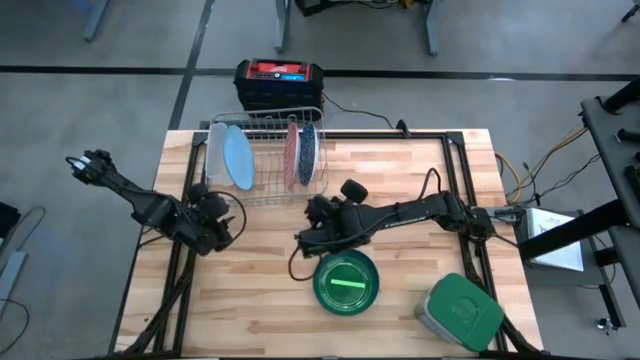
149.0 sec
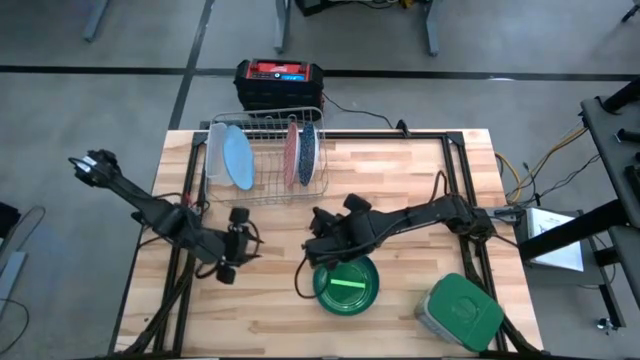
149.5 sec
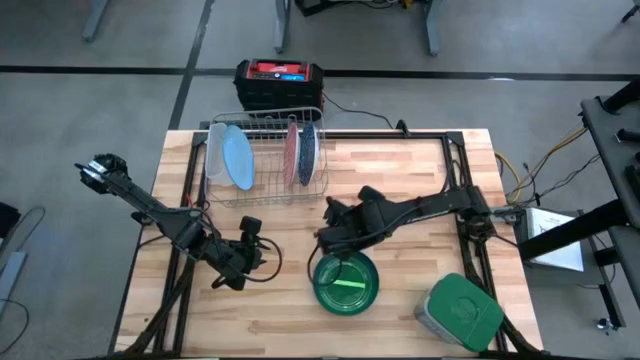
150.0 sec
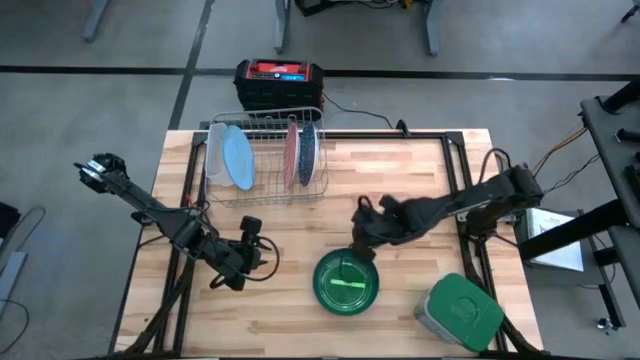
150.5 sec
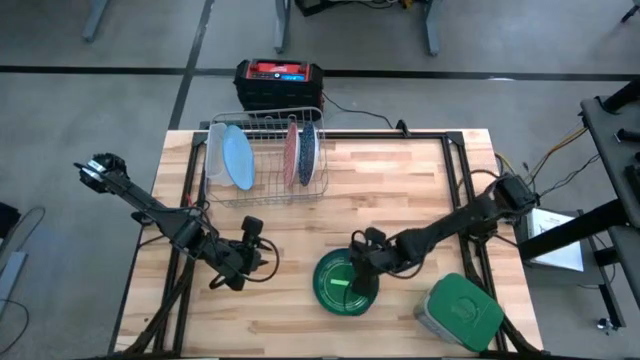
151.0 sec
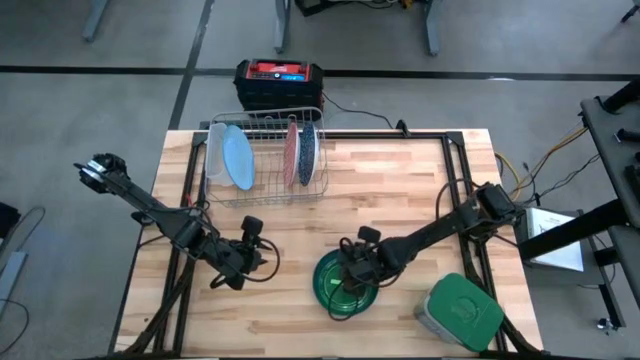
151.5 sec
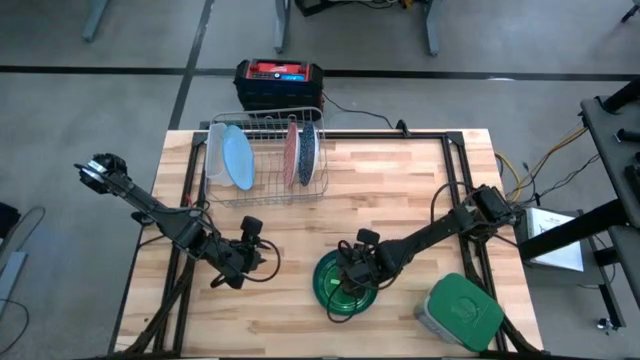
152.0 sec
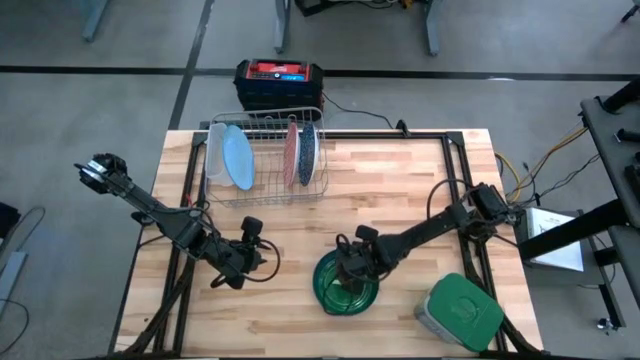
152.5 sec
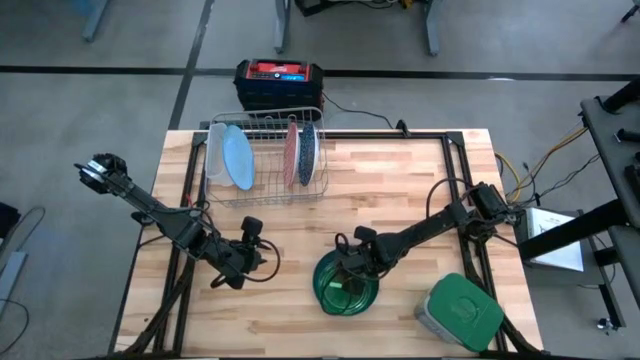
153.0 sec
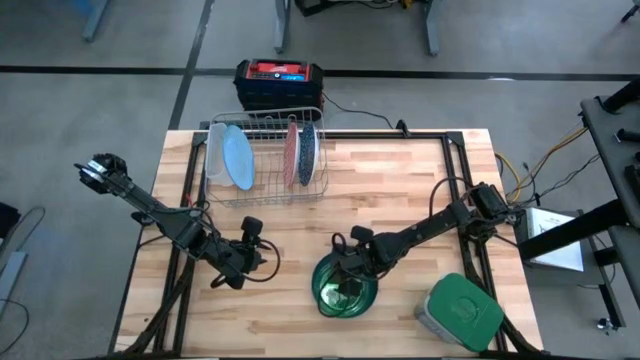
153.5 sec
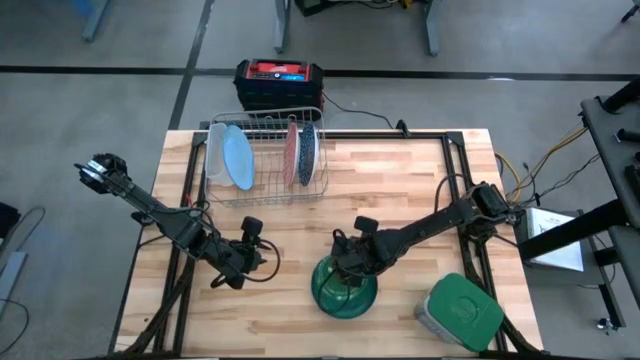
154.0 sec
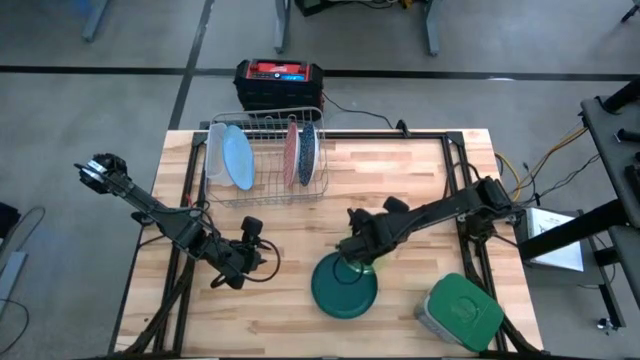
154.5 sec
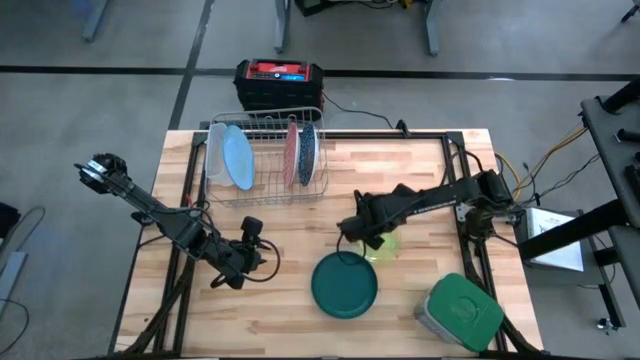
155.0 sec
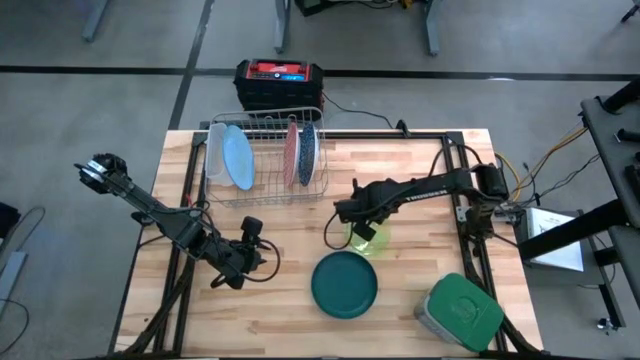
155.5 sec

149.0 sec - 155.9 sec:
Task: Sort dishes
Move the light green plate to the center of the table

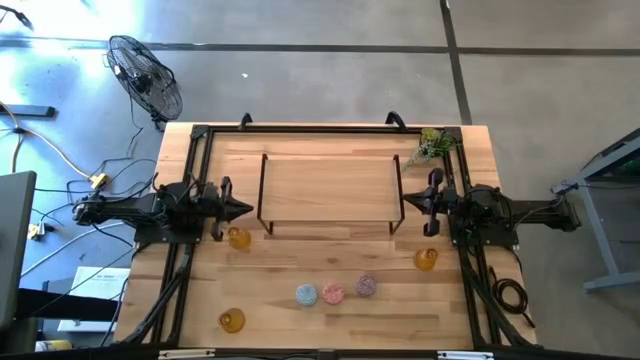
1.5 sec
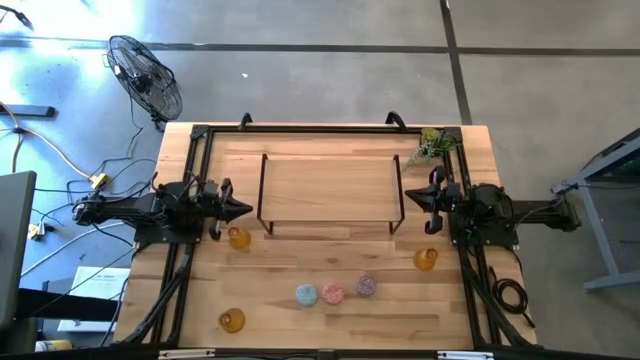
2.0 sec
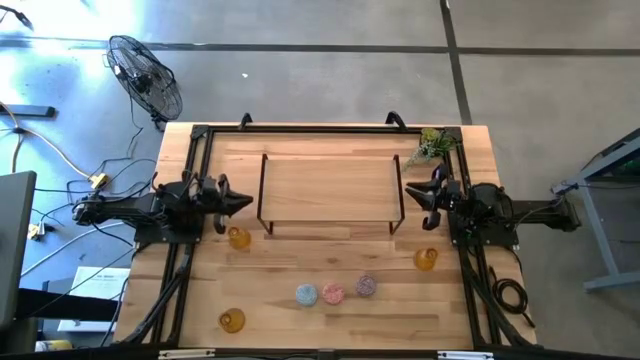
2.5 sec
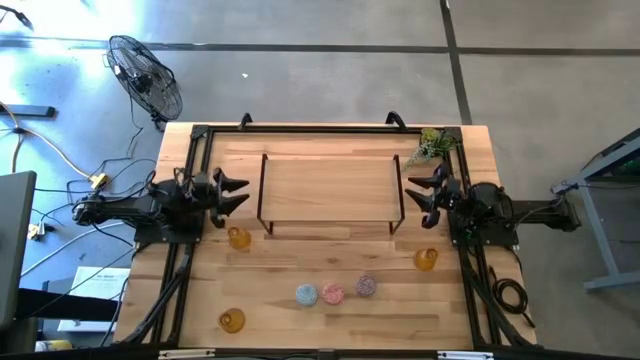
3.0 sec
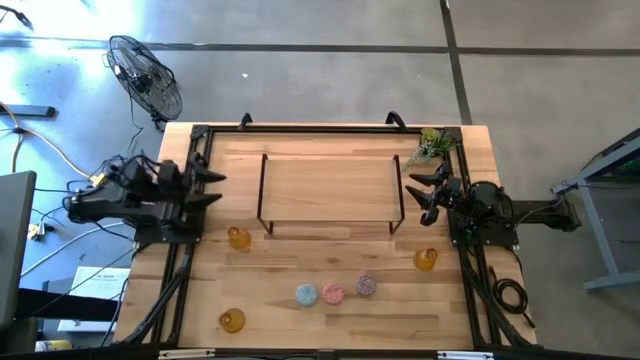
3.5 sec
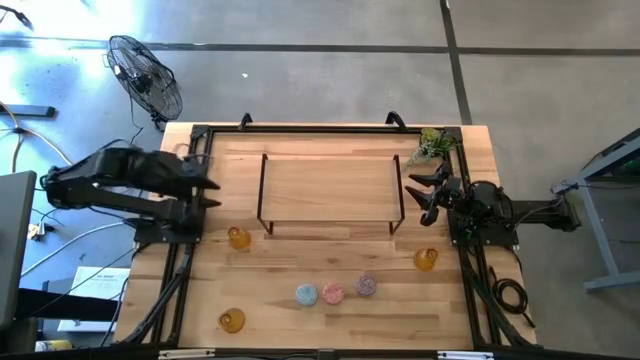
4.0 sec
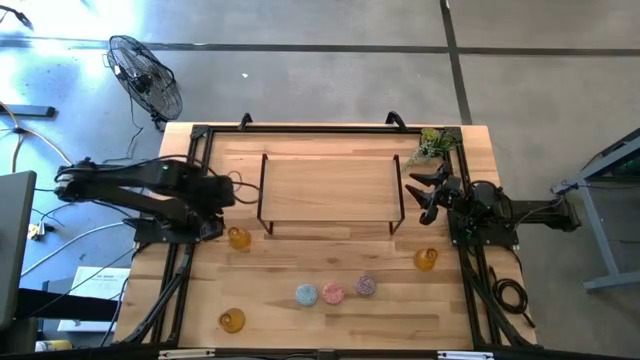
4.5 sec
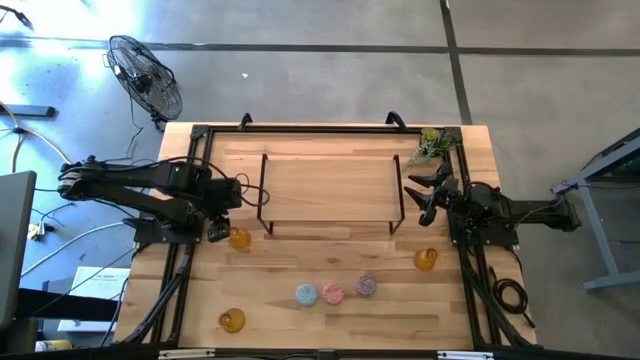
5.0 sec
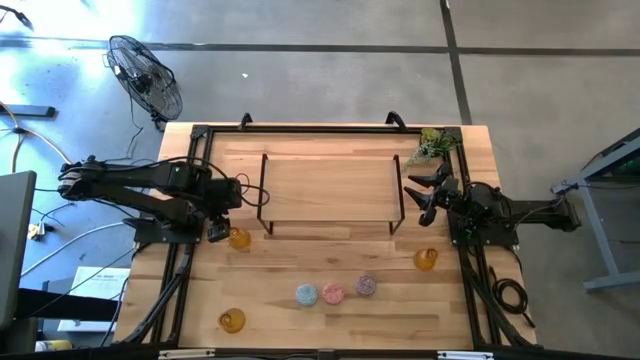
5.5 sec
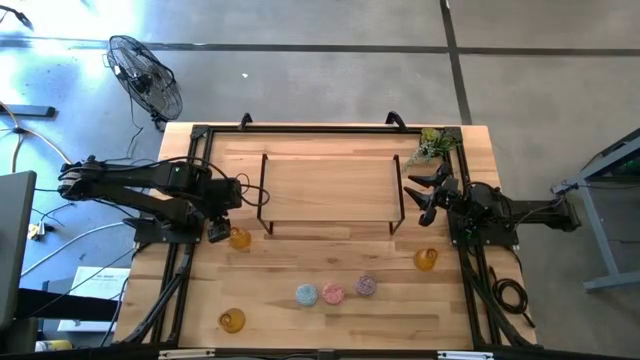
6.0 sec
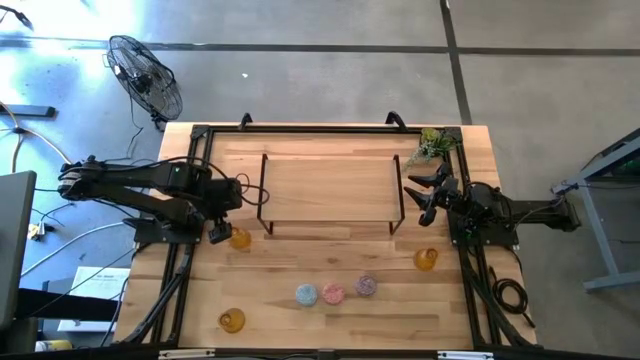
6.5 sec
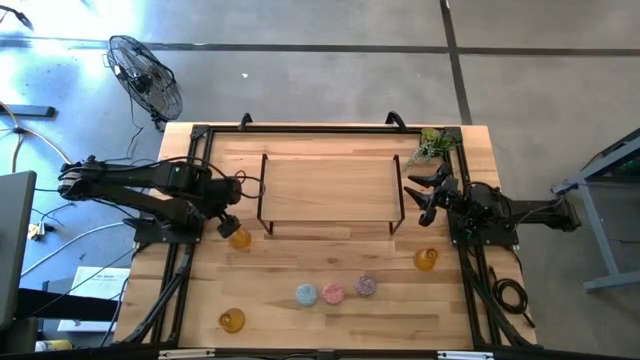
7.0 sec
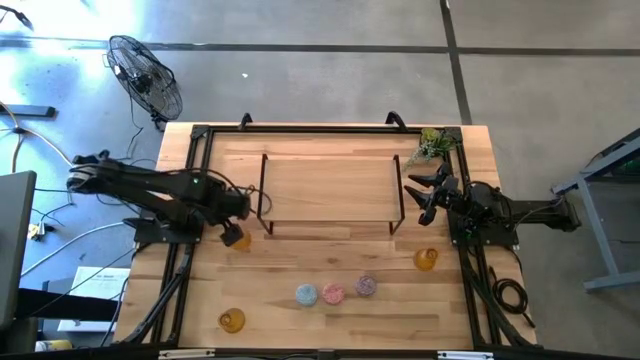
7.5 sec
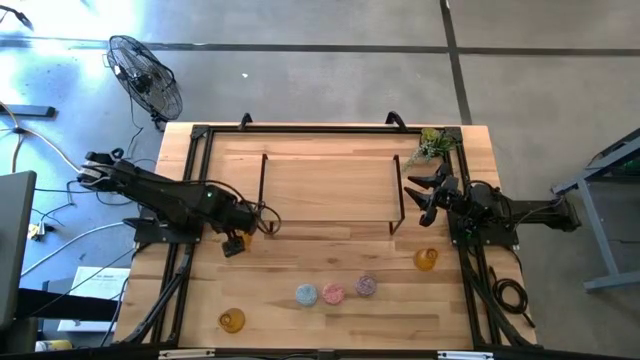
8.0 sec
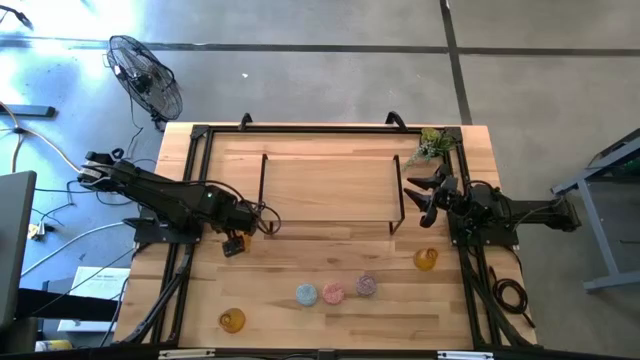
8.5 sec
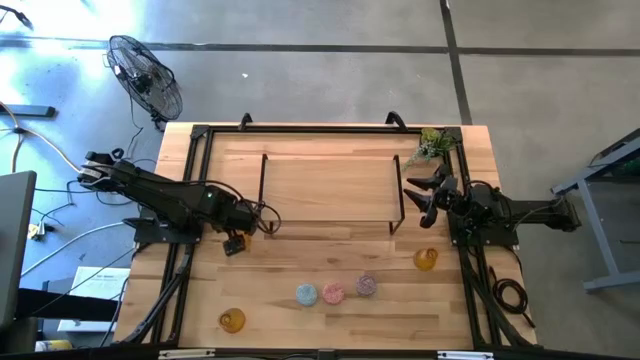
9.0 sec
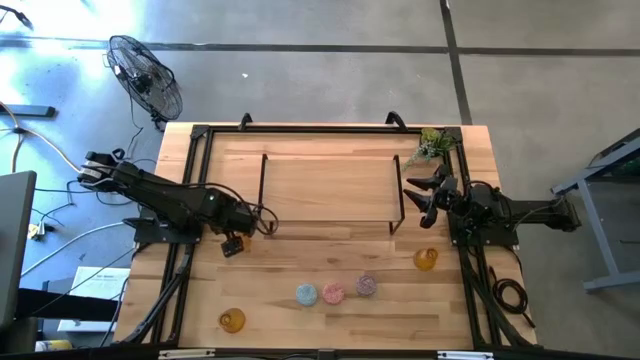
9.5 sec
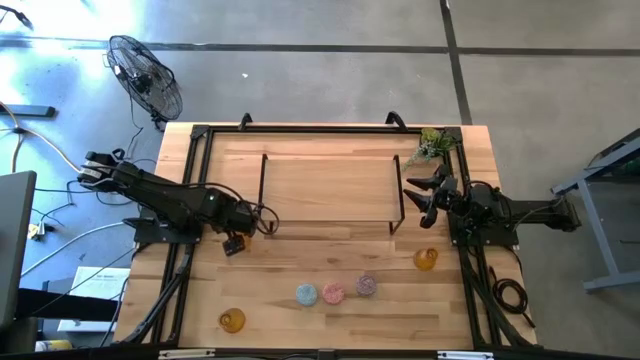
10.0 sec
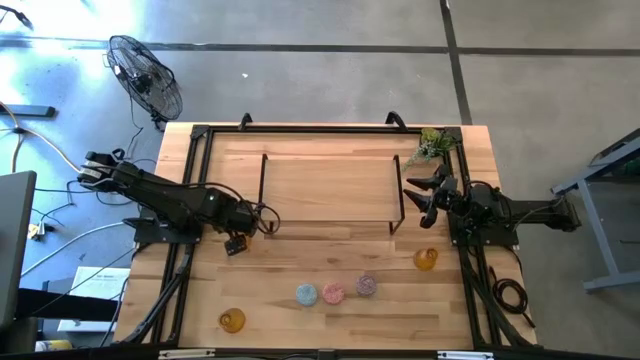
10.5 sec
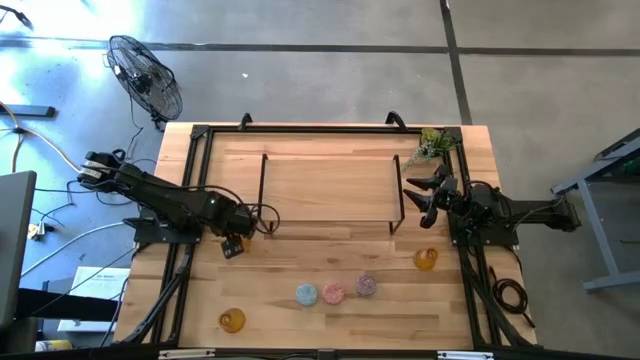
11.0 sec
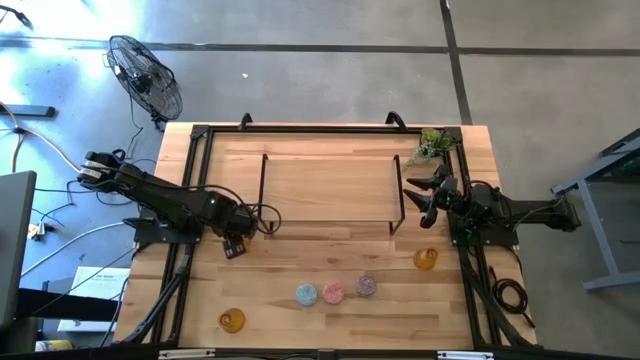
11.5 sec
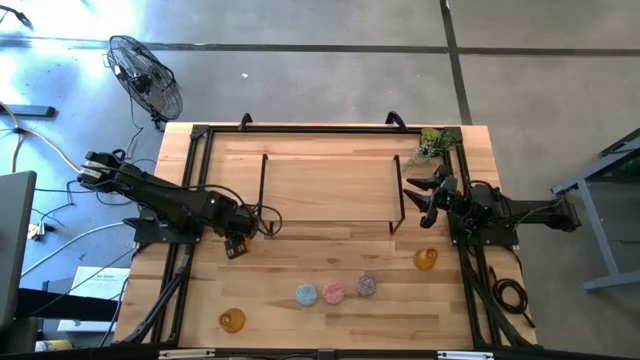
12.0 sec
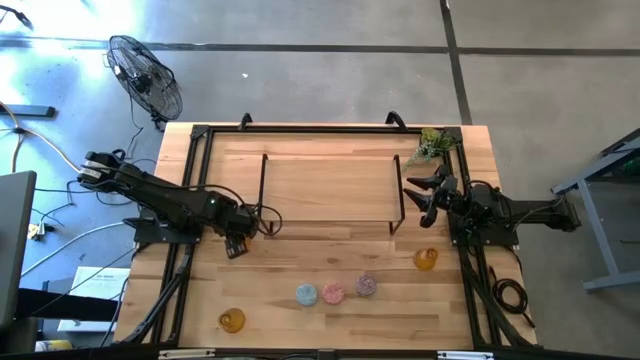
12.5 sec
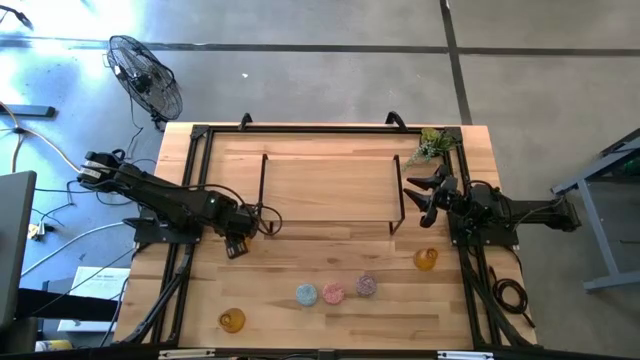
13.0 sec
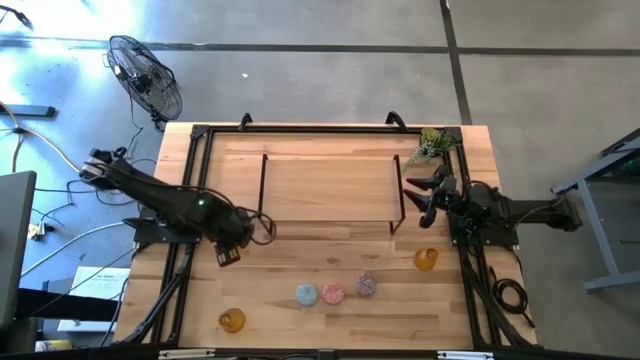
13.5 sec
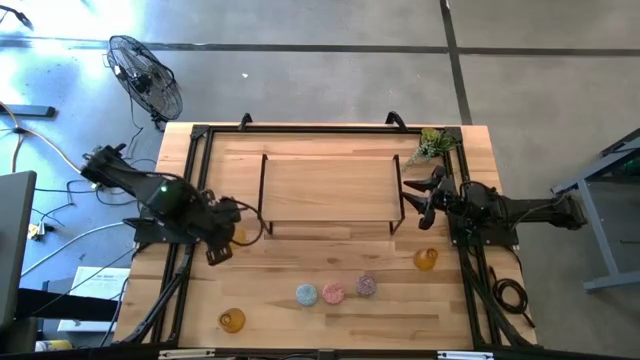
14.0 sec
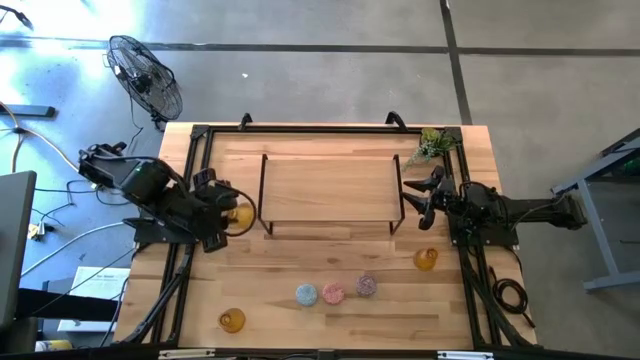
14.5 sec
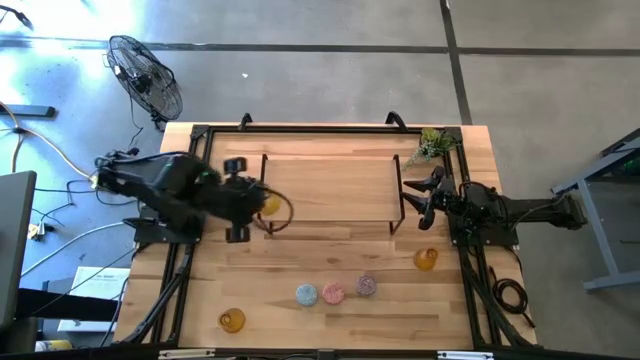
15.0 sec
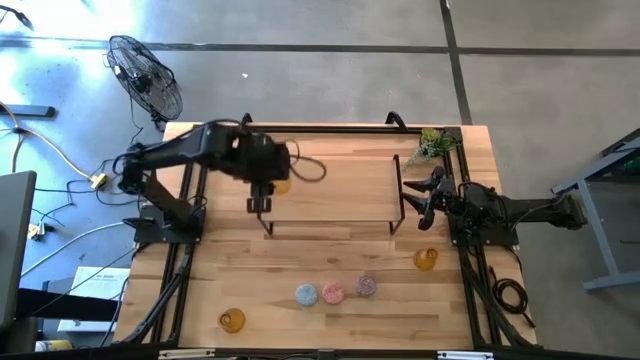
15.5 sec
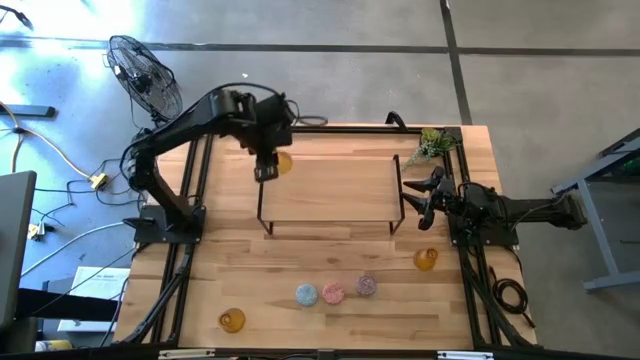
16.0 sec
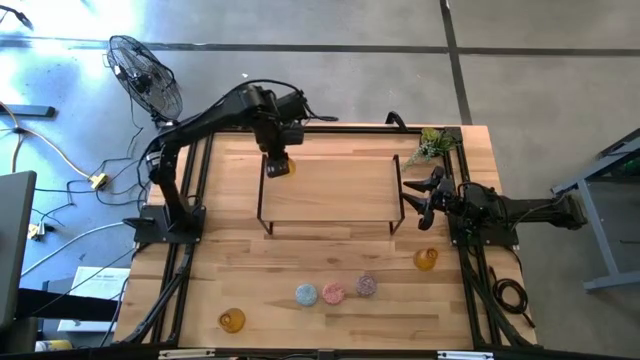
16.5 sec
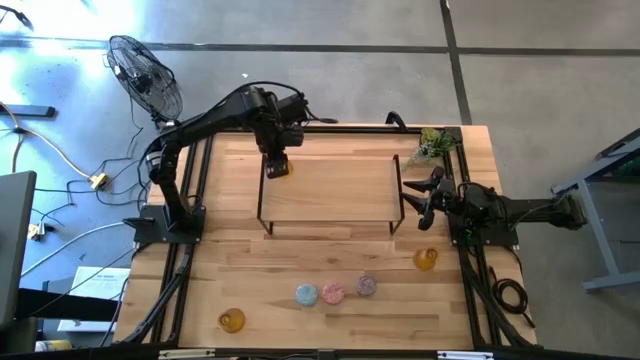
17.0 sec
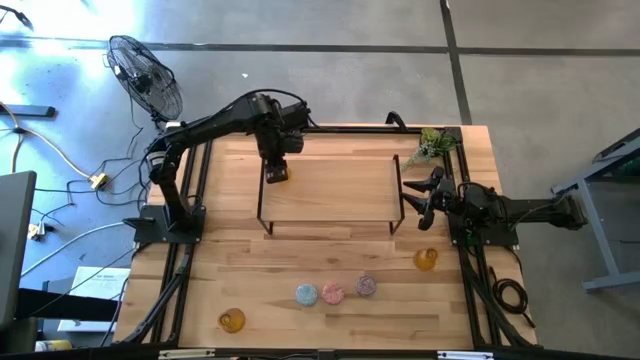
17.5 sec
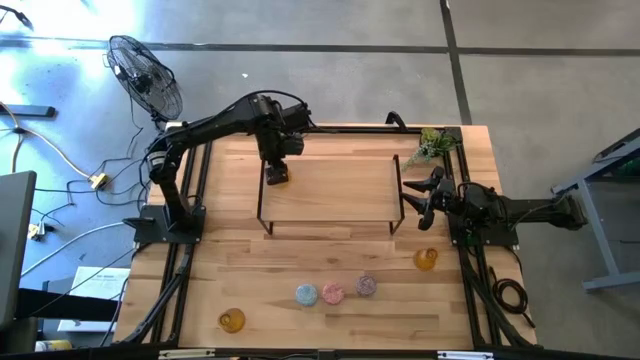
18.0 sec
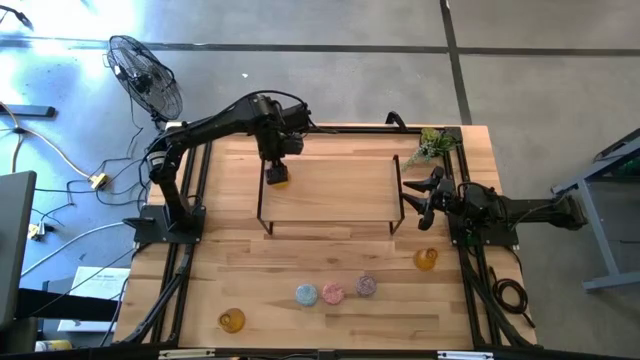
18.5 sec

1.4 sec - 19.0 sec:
Task: Pick & Place candle stick holders
Put the top left yellow glass candle holder on the shelf
